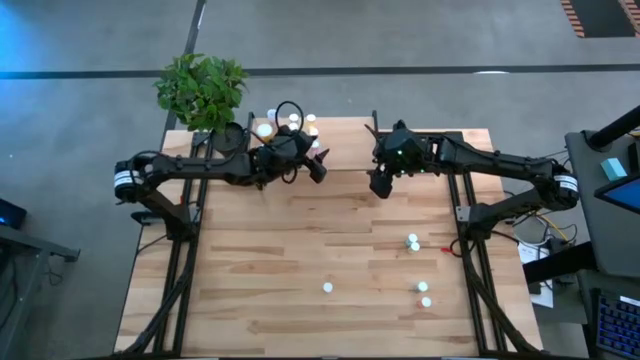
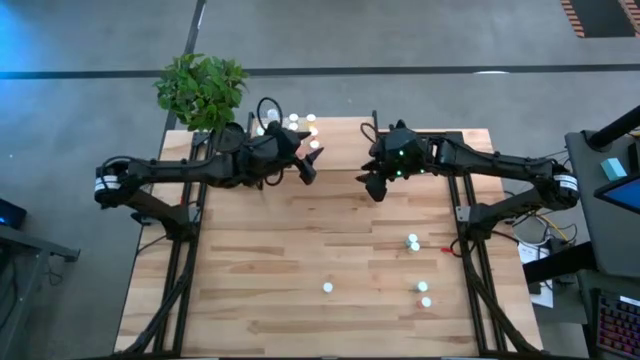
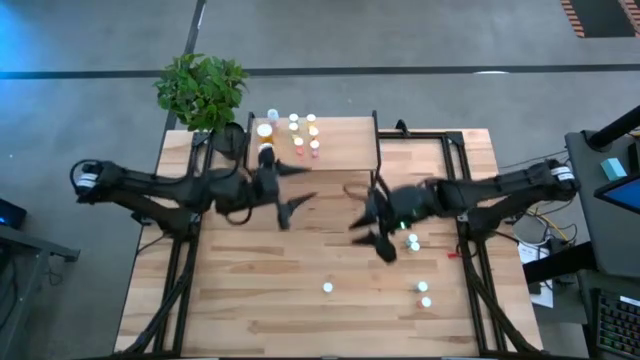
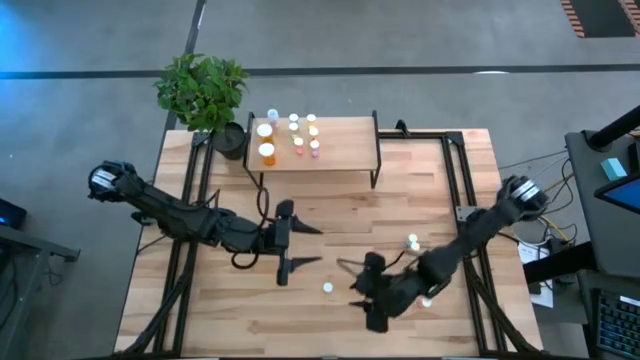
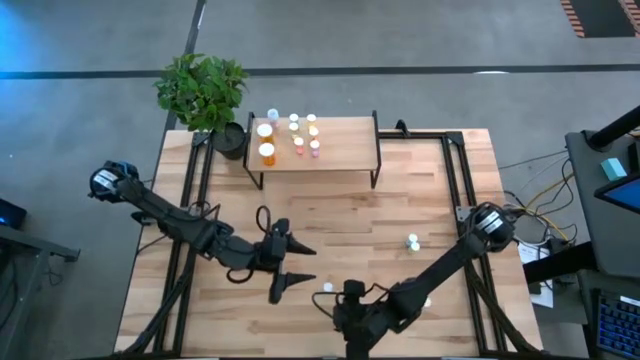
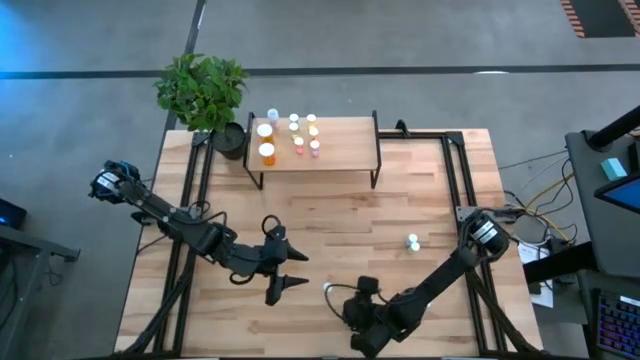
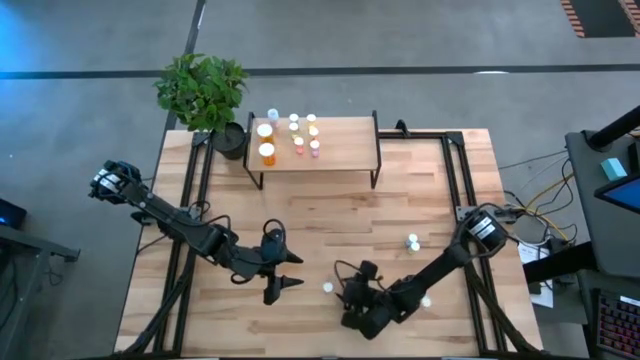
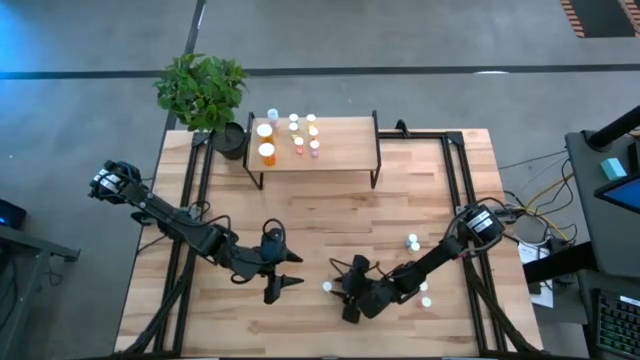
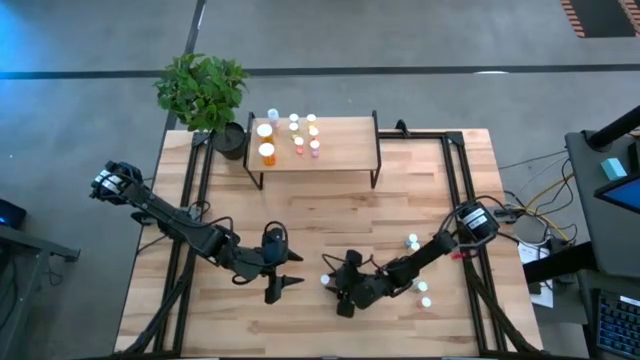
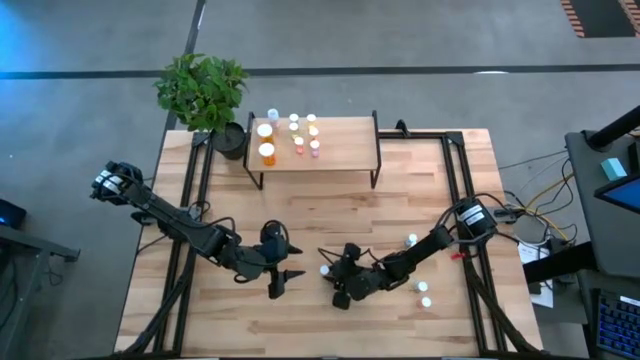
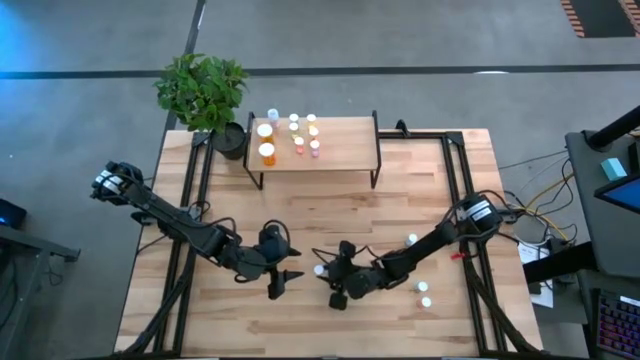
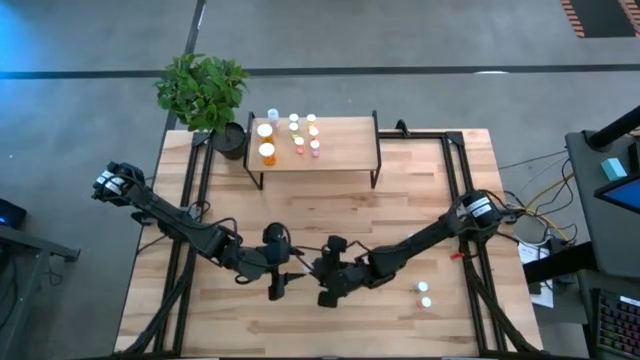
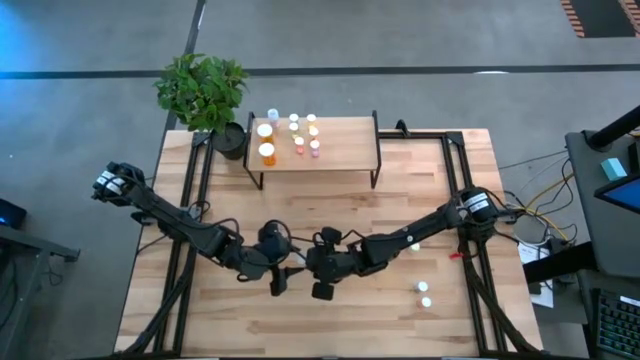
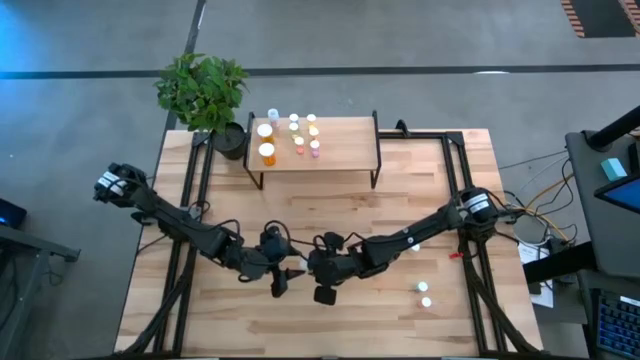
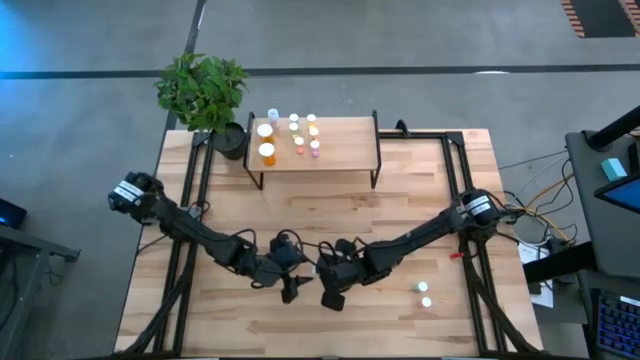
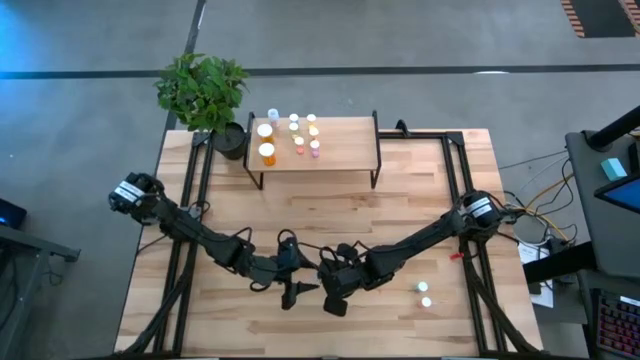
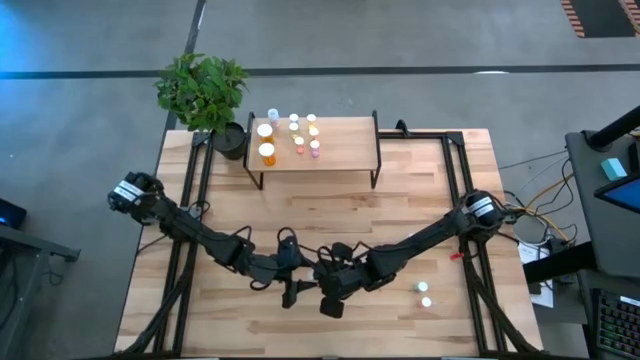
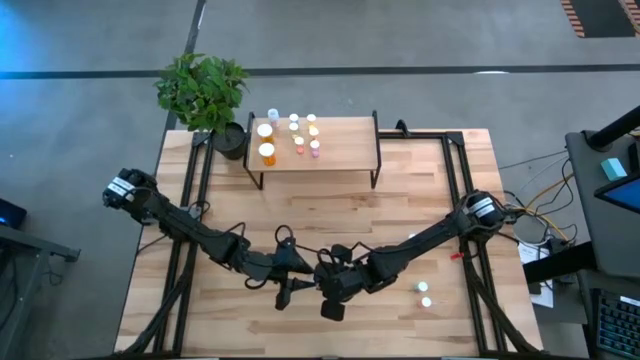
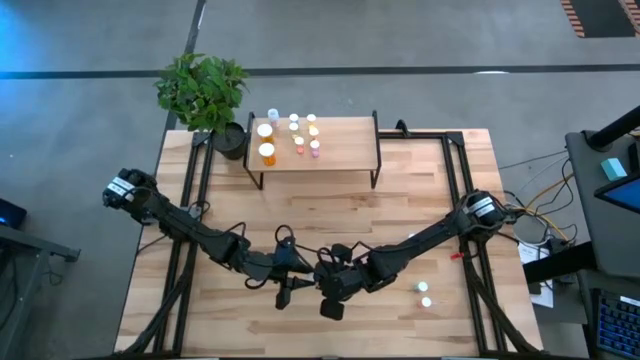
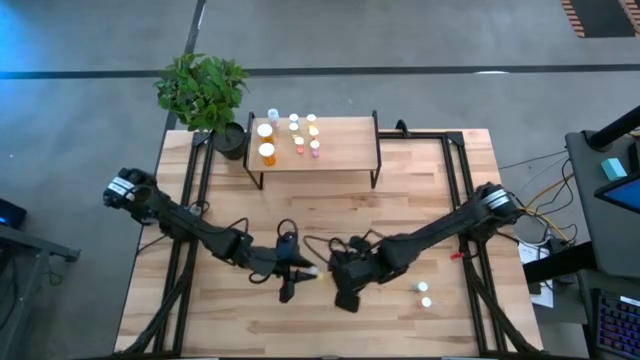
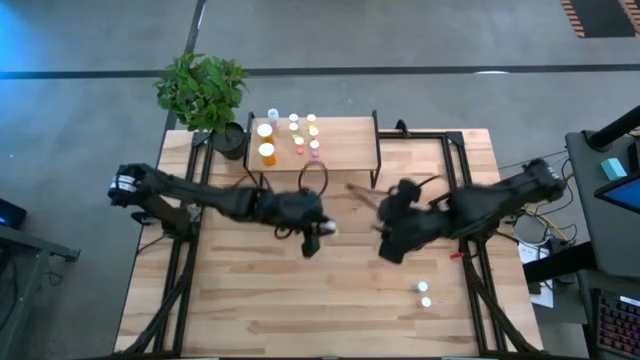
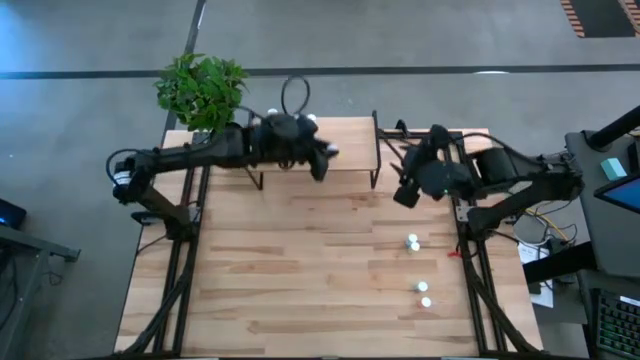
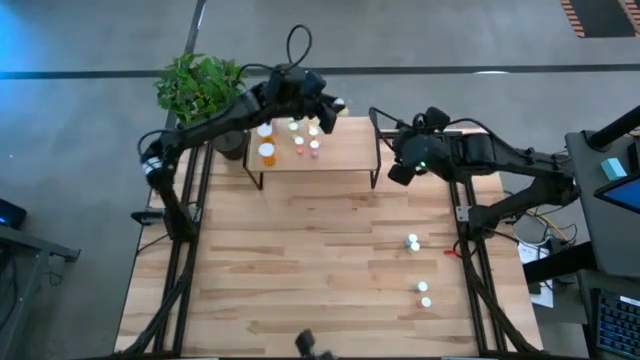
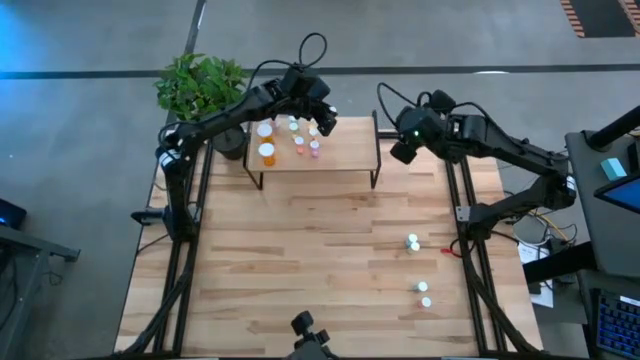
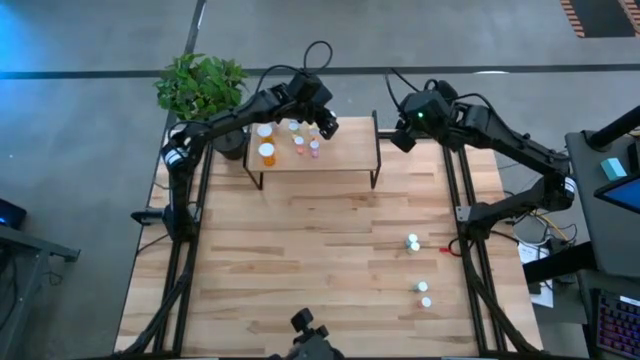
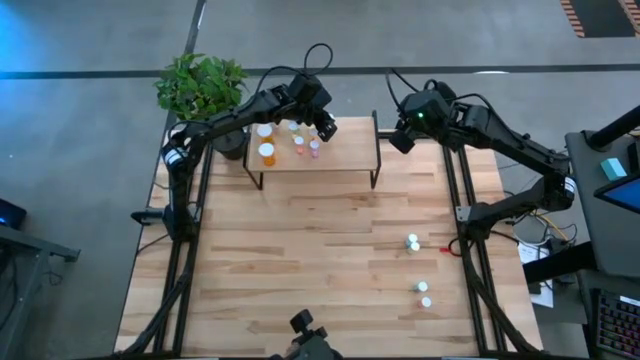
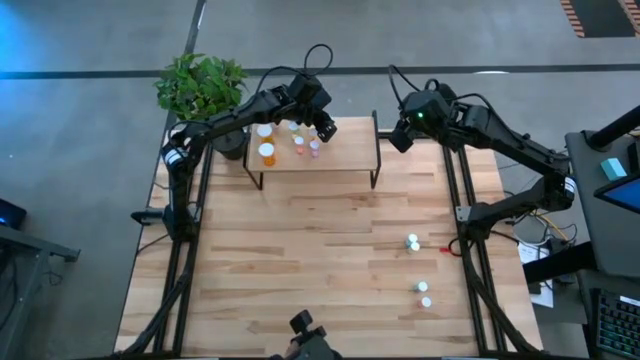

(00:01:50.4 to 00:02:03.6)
Task: Pick and place medicine bottles onto shelf by color
Put the yellow pill bottle on the shelf

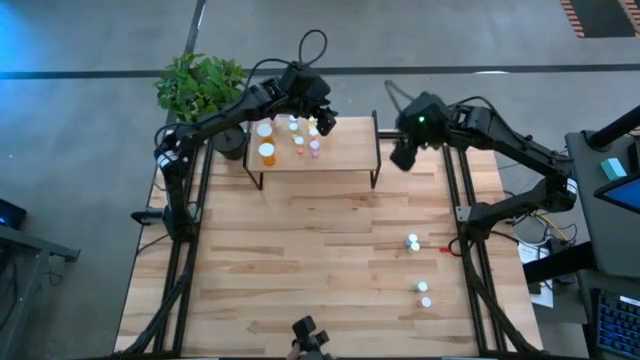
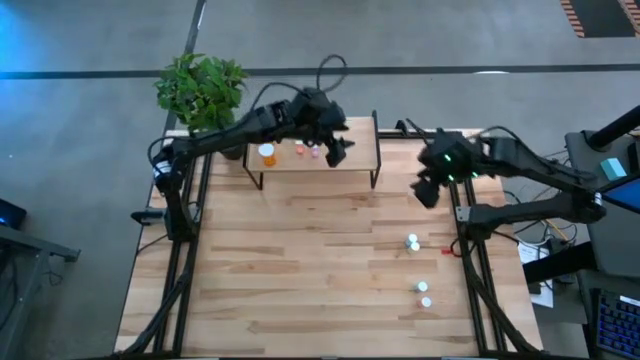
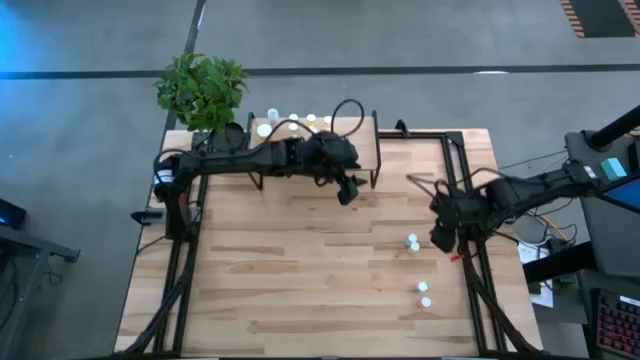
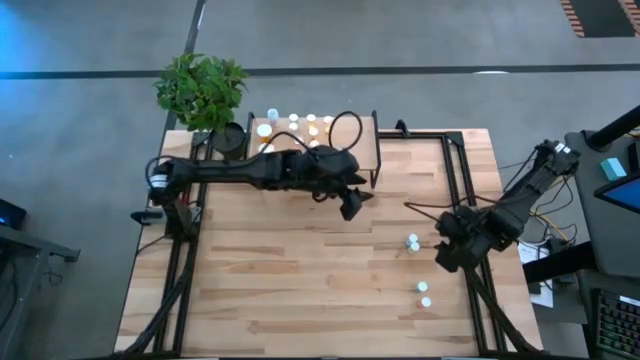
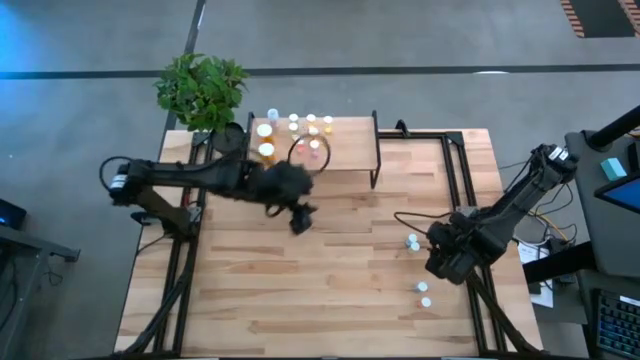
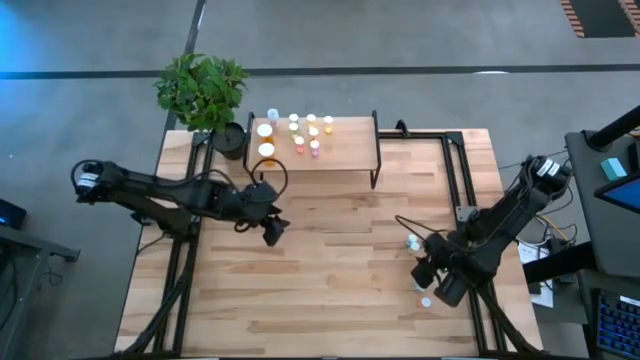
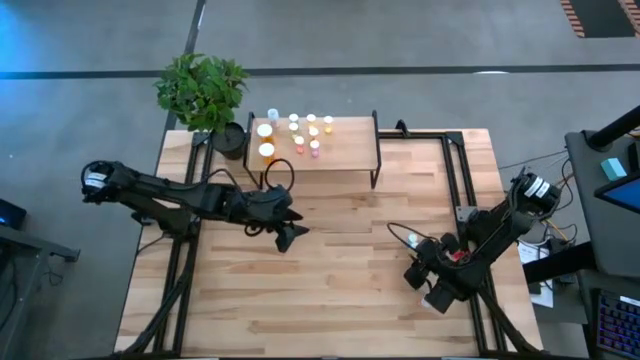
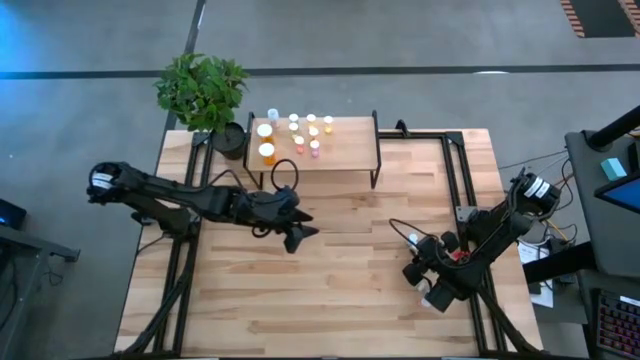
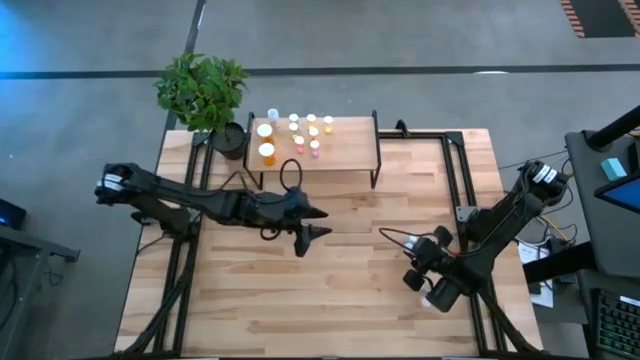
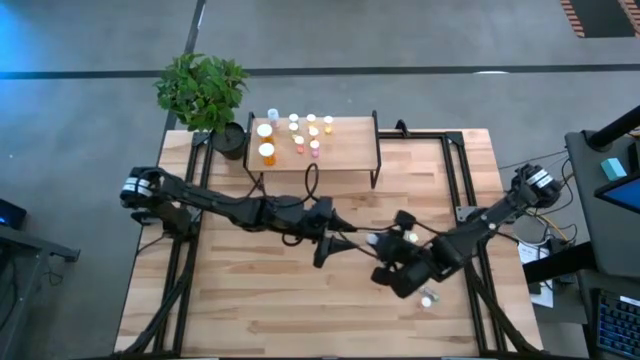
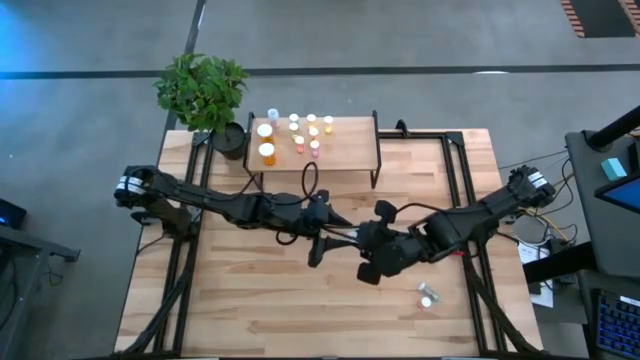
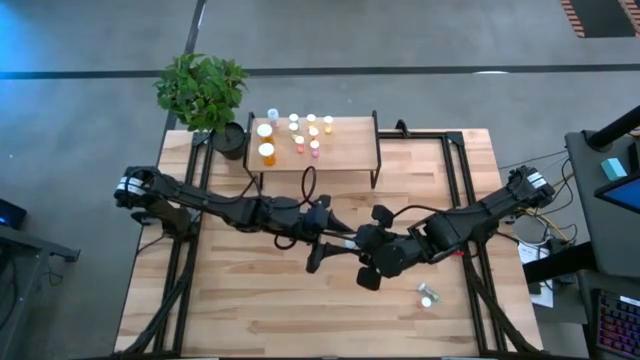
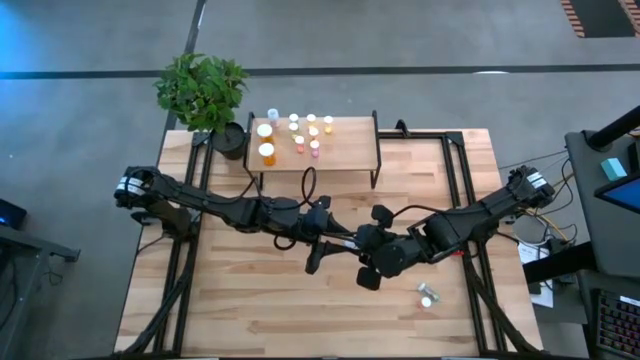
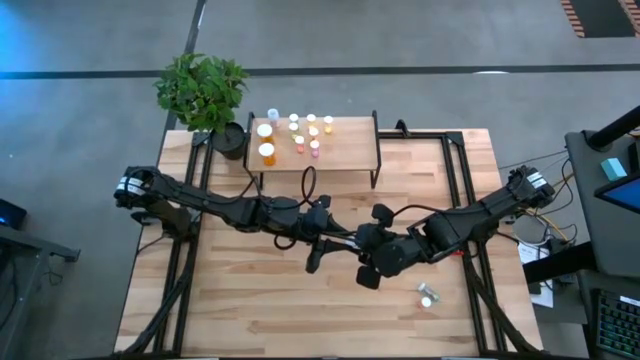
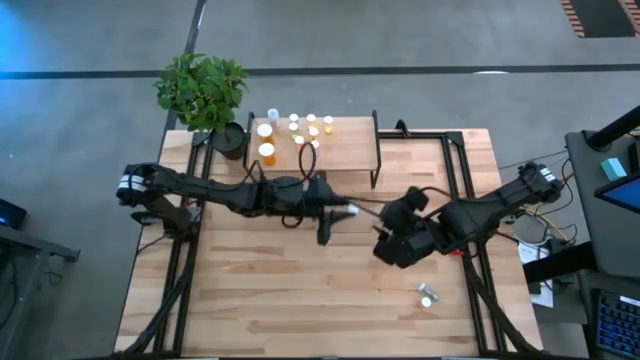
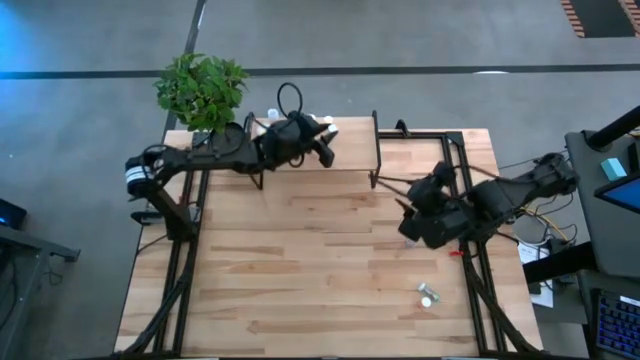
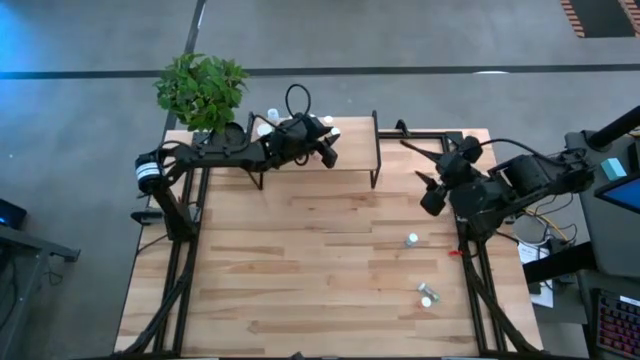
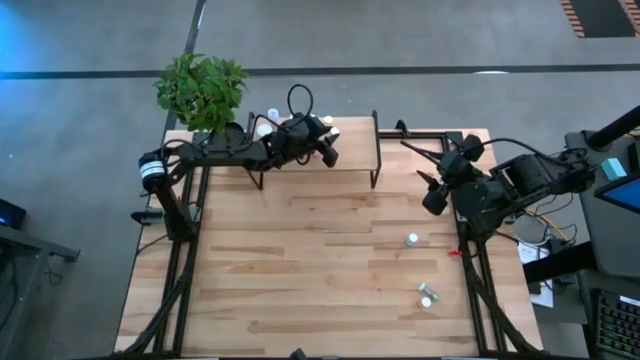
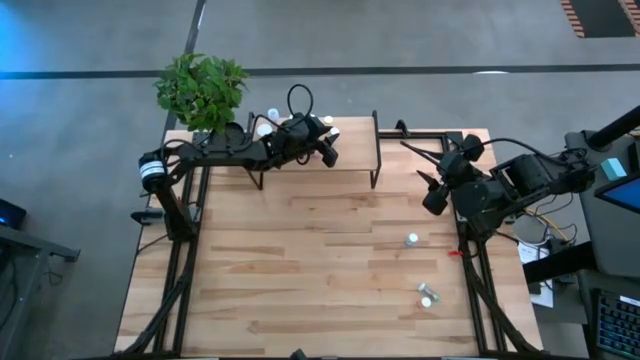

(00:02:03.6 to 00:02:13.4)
Put the yellow pill bottle on the shelf
